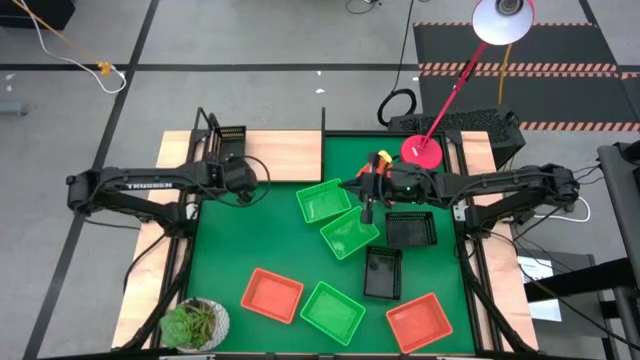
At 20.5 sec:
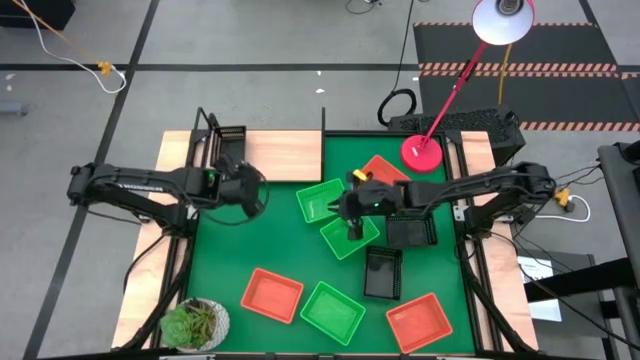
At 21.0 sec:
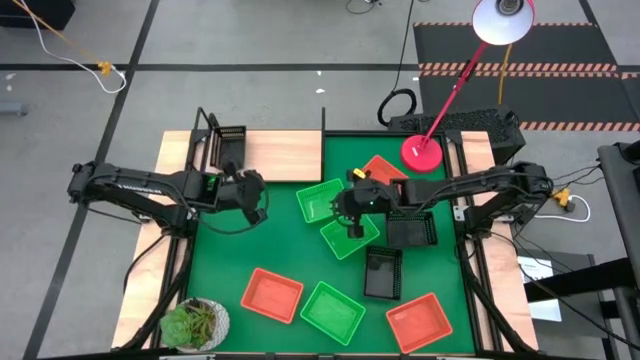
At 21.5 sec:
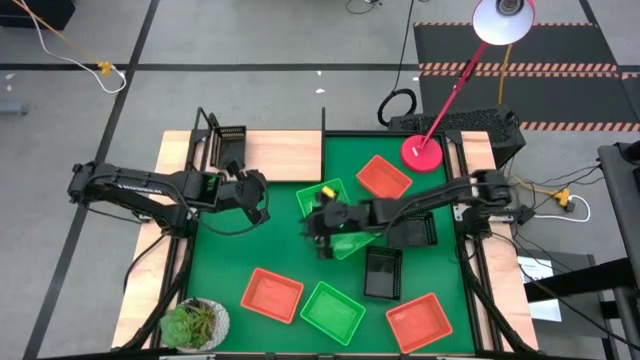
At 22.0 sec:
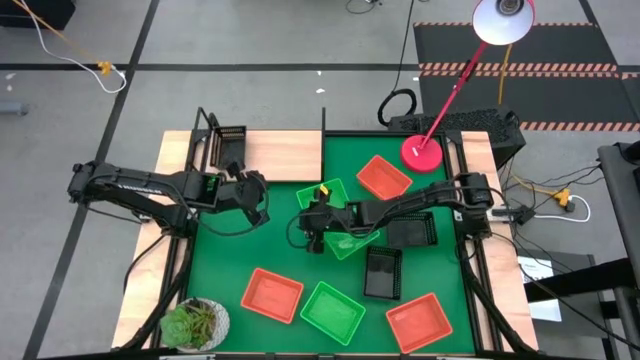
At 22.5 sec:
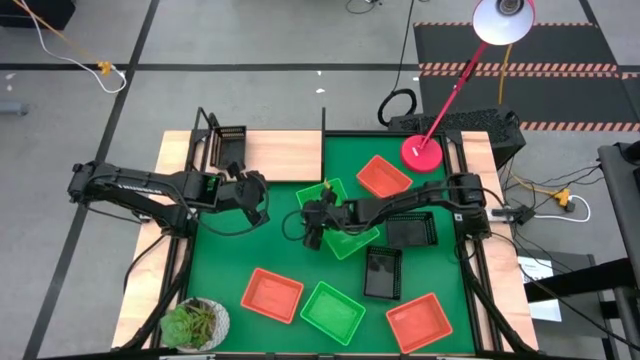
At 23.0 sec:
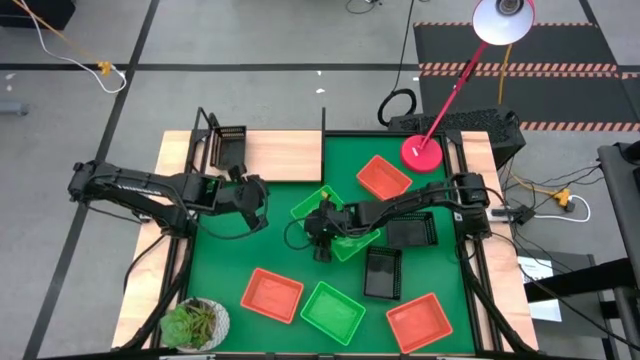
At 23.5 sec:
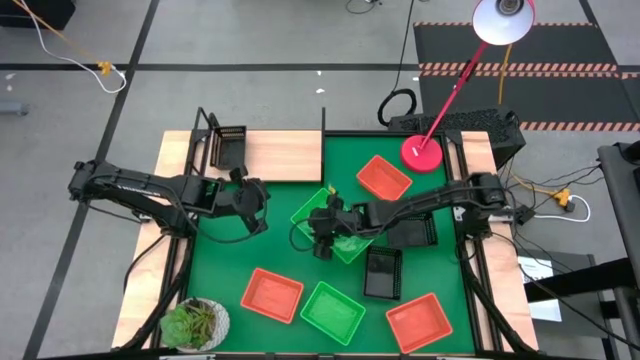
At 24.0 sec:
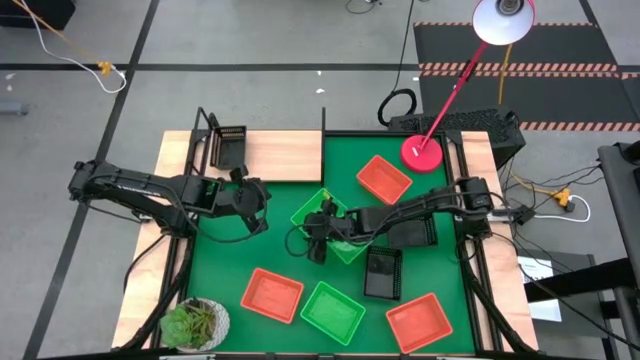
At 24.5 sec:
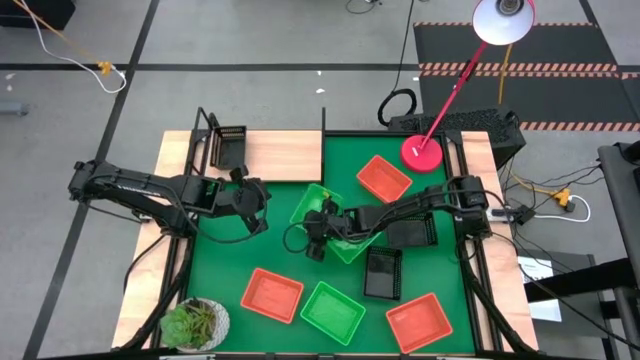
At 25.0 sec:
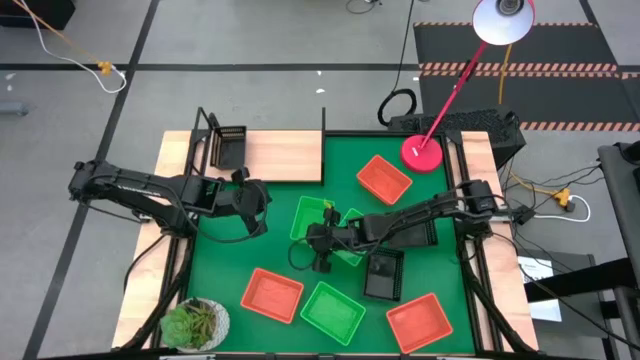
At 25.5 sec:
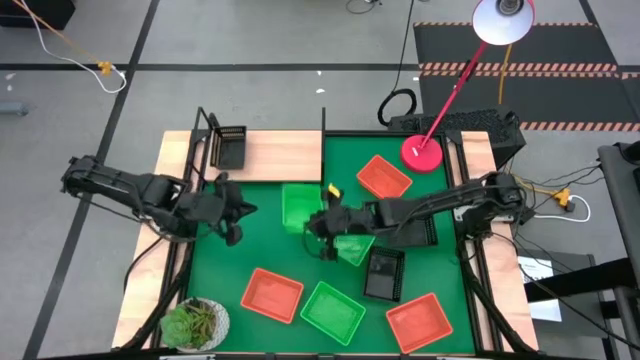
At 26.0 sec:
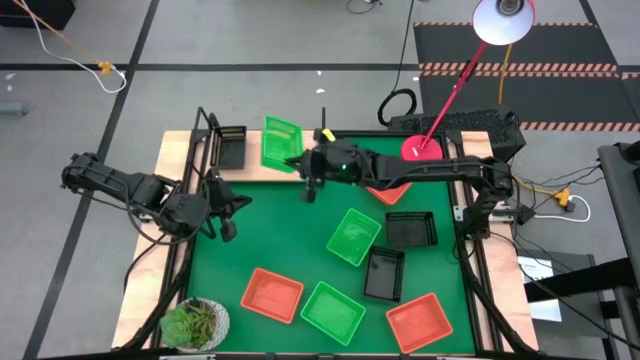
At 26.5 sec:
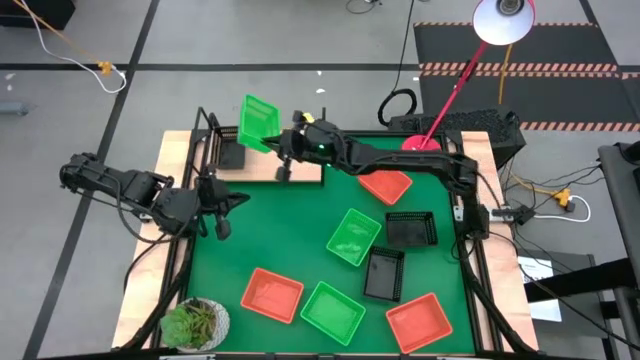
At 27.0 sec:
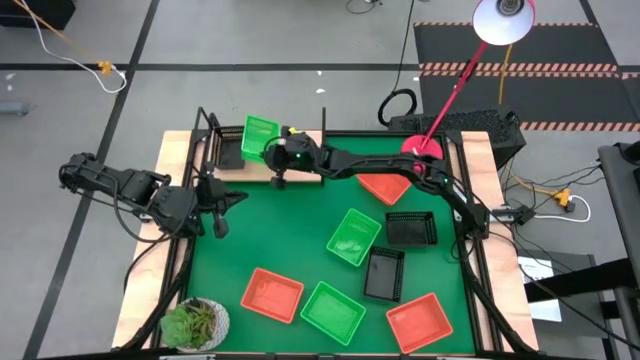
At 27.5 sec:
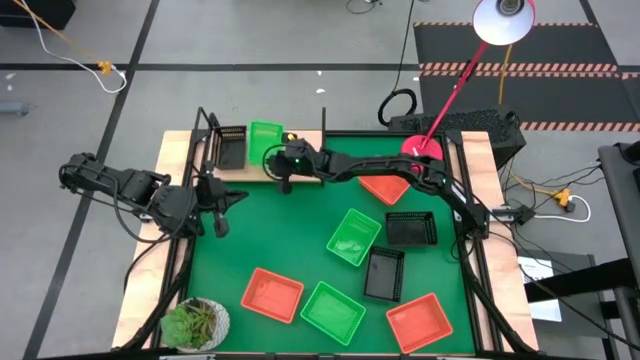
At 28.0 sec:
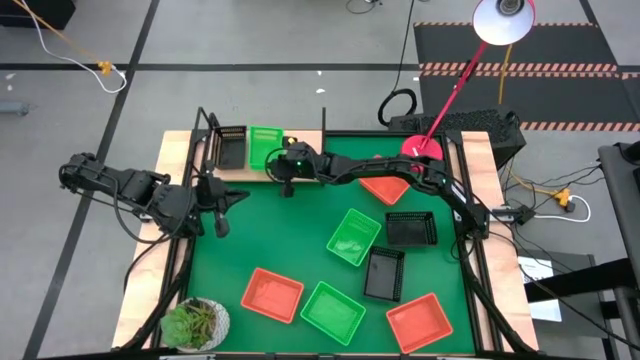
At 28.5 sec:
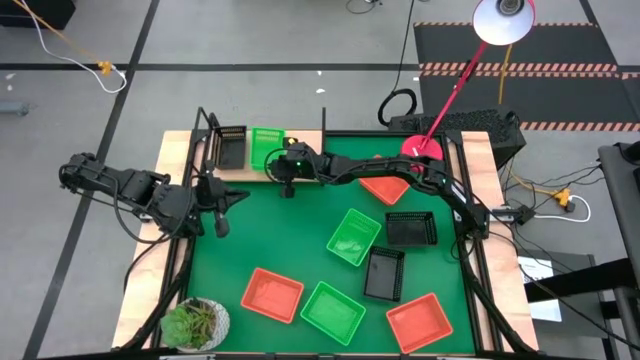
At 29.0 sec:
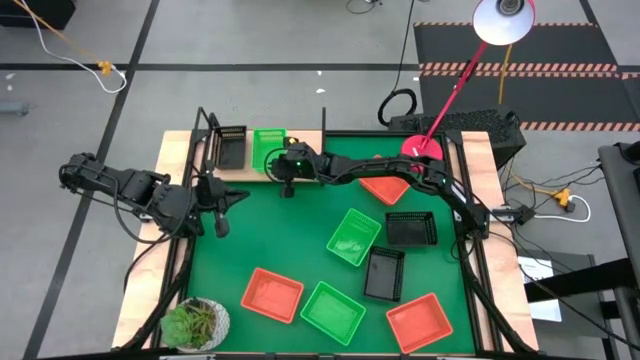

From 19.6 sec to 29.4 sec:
Task: Stack baskets on shelf by color
Put the green bin on the shelf

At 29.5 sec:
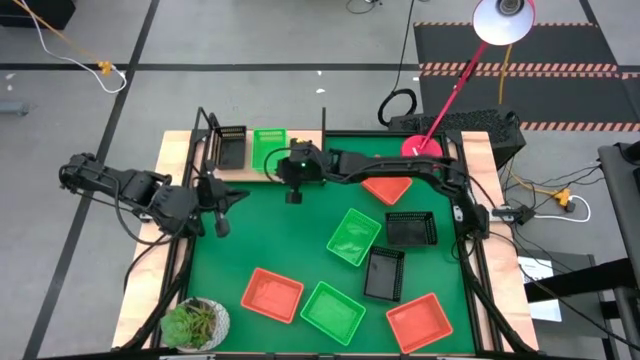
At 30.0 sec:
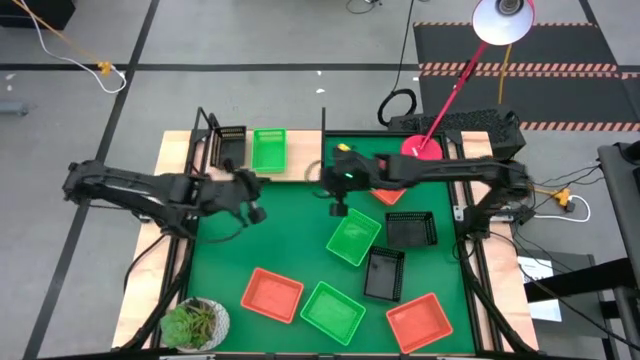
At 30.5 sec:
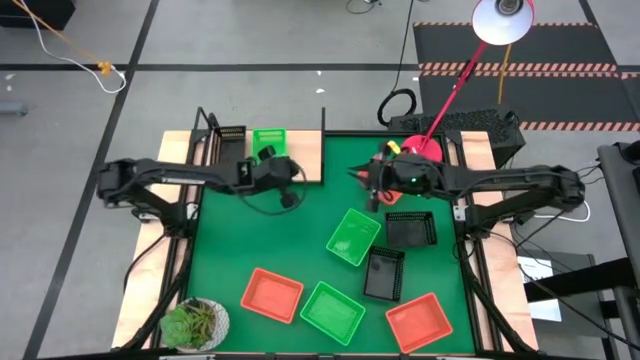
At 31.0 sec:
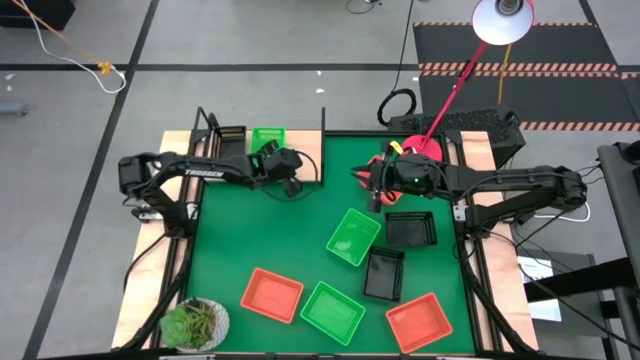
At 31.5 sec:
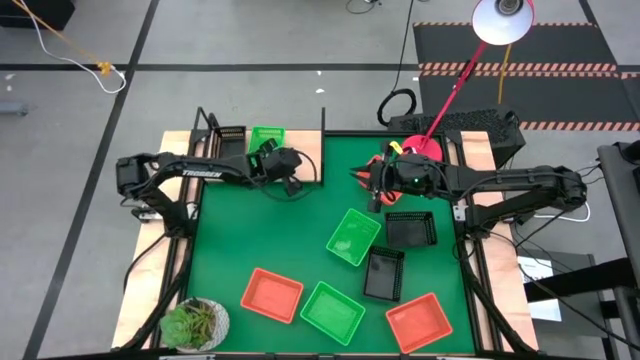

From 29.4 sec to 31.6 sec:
Adjust the green bin on the shelf

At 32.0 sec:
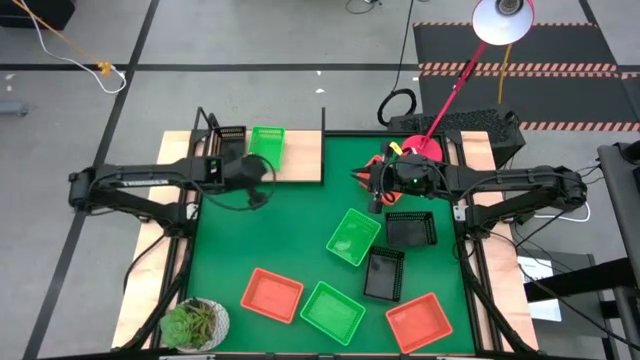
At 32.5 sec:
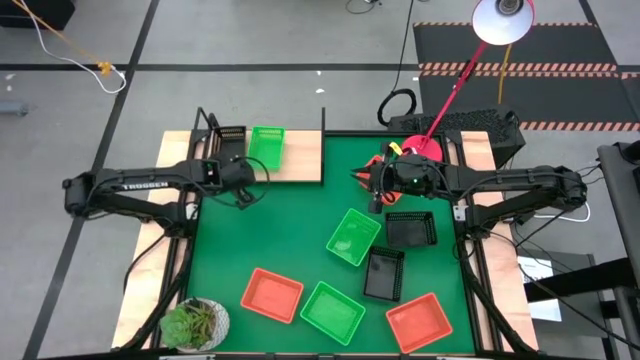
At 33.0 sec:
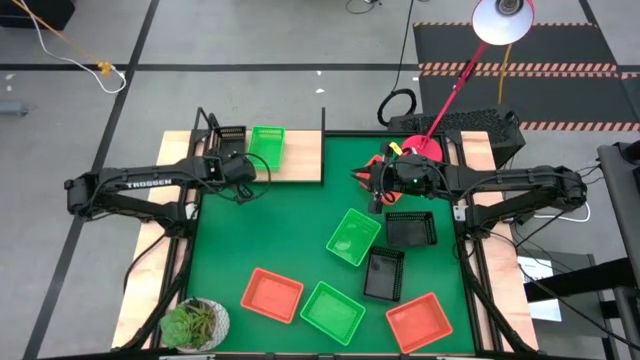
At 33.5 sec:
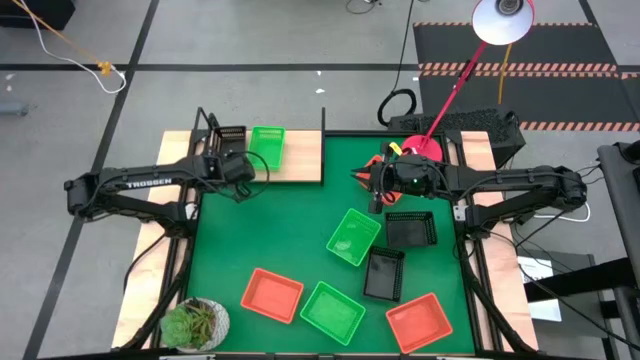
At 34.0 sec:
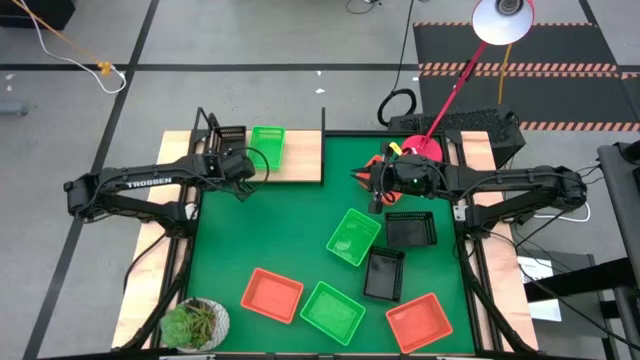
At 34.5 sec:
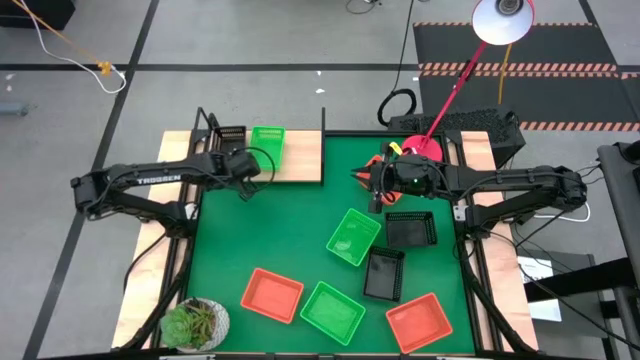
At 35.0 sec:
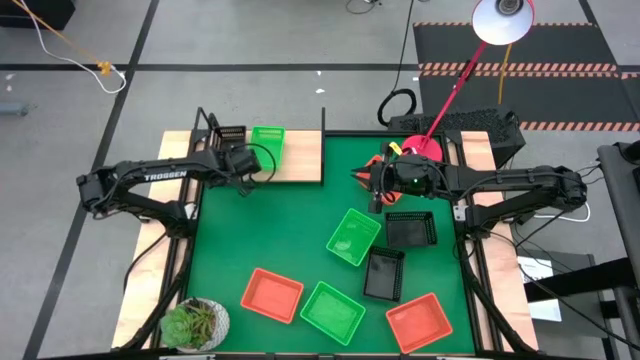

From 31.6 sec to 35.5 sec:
Adjust the black bin on the shelf

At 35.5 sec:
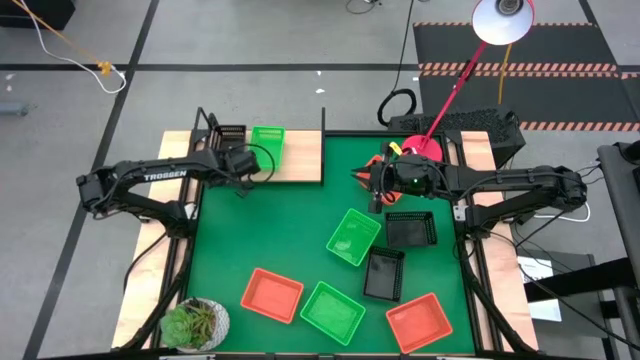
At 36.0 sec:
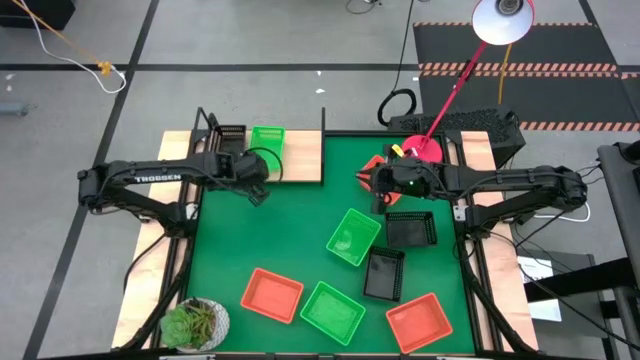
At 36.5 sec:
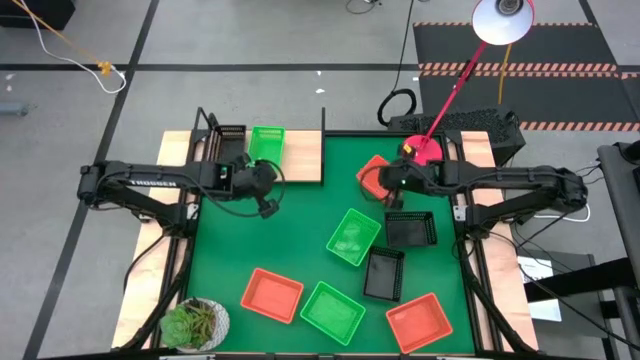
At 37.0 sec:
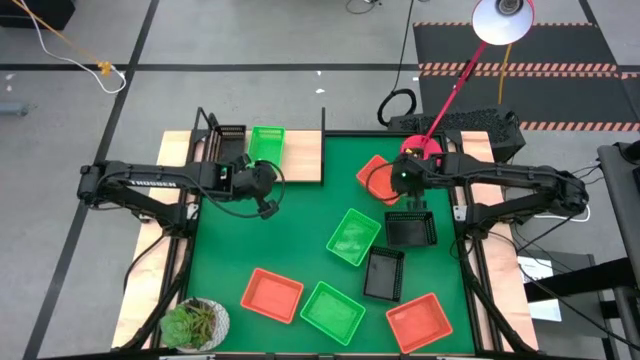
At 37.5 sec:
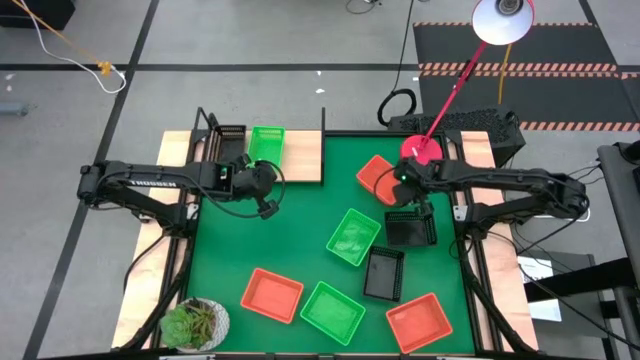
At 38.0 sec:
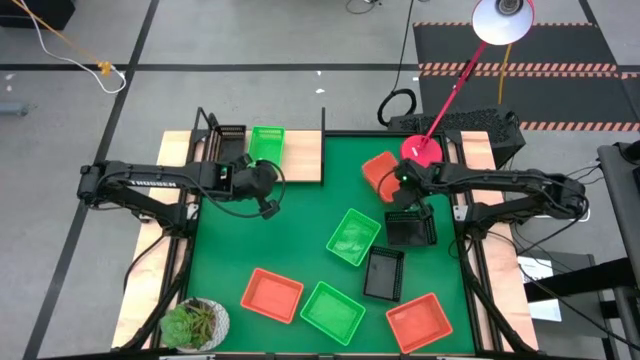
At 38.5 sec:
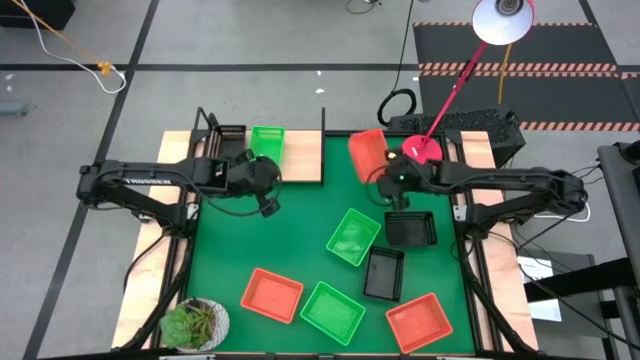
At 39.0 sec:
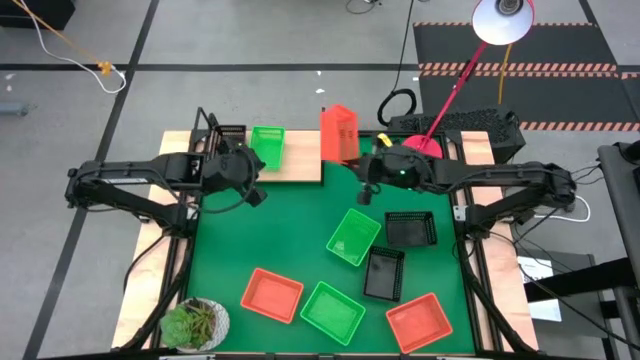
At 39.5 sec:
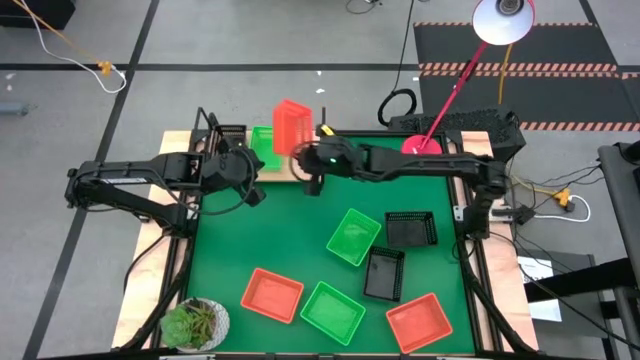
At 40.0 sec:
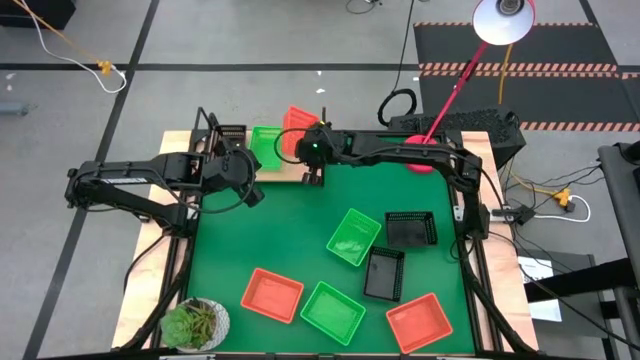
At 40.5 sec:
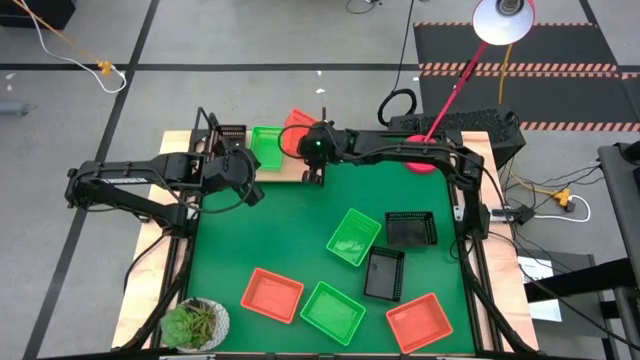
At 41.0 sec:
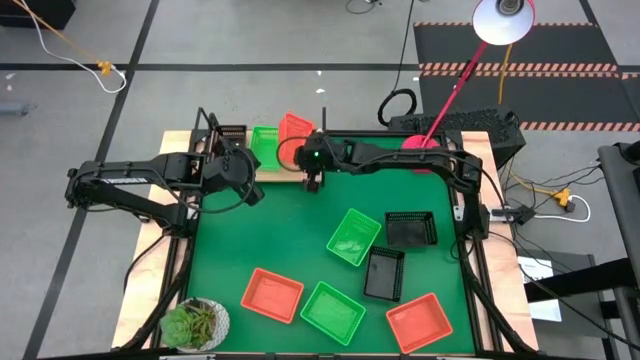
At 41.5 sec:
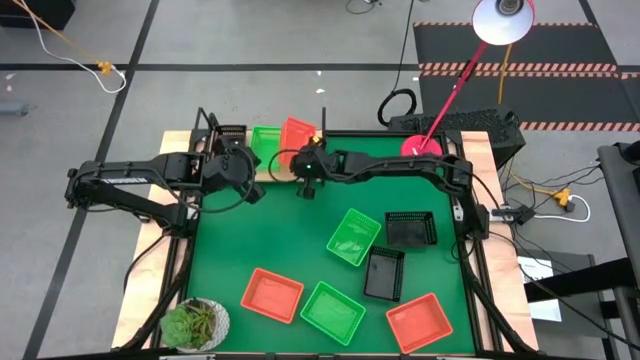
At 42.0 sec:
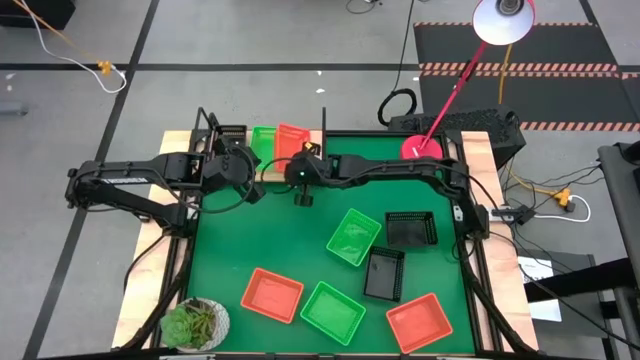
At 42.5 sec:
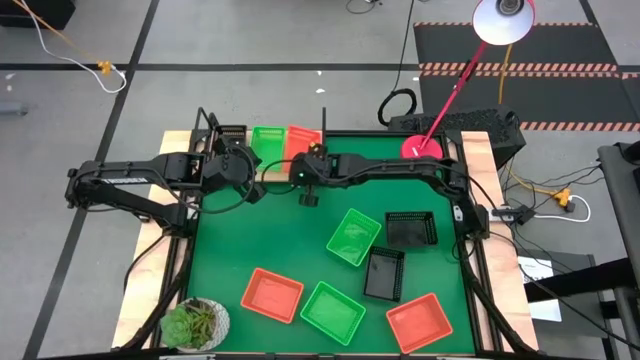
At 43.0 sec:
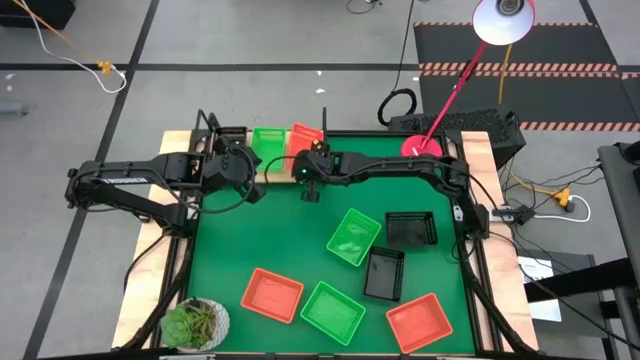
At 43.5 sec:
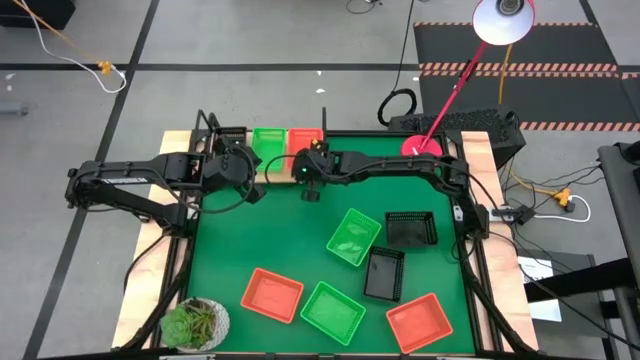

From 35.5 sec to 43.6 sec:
Put the orange bin on the shelf
